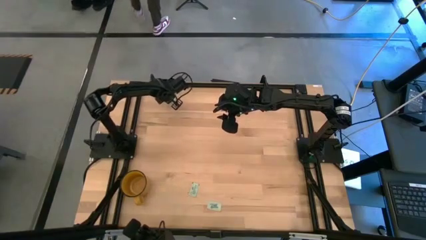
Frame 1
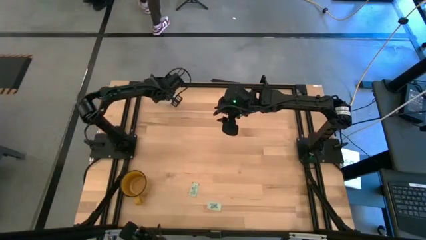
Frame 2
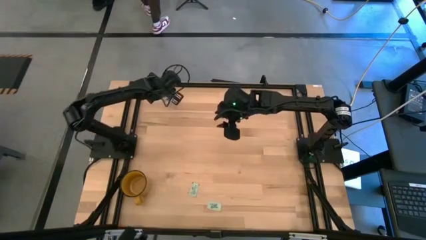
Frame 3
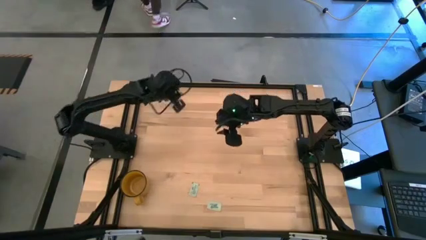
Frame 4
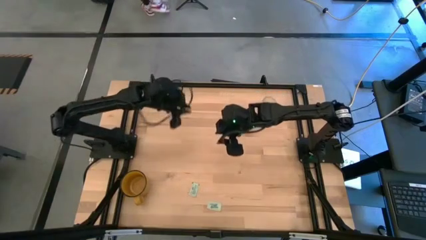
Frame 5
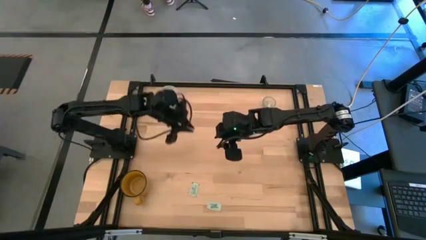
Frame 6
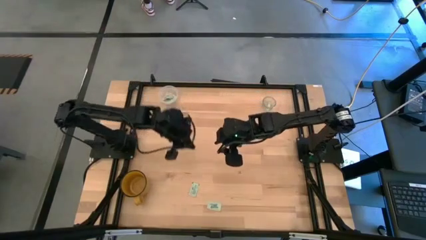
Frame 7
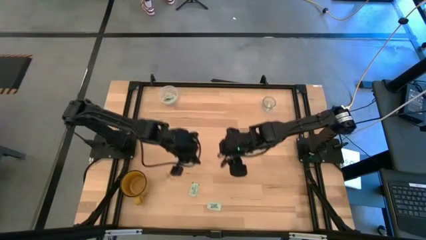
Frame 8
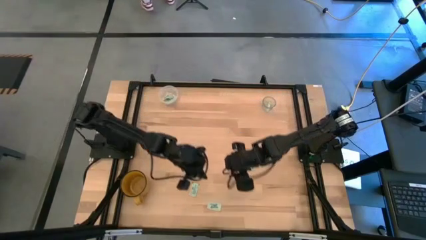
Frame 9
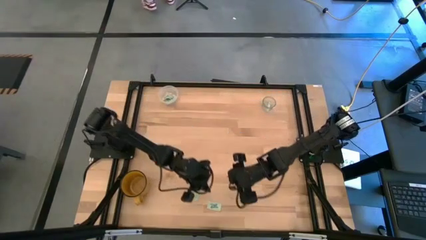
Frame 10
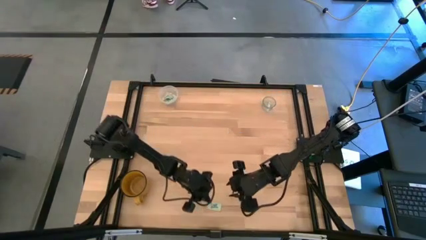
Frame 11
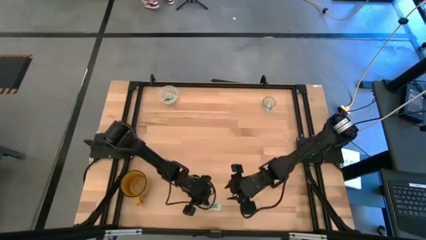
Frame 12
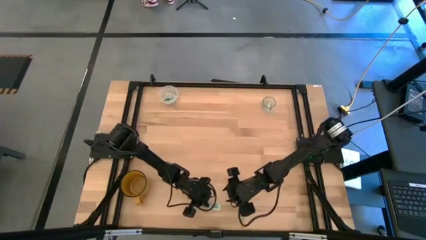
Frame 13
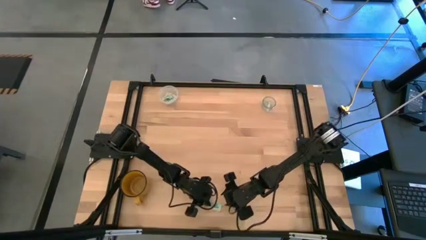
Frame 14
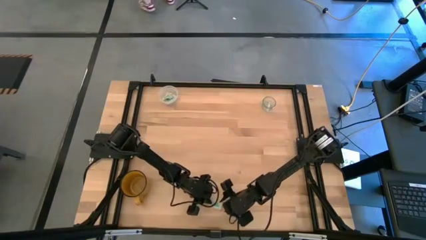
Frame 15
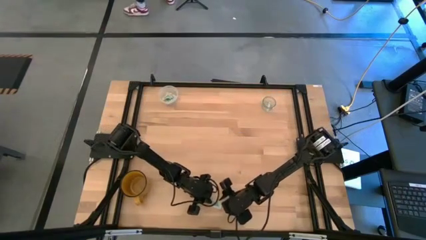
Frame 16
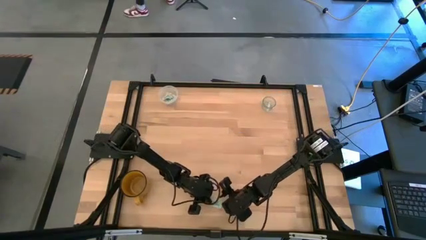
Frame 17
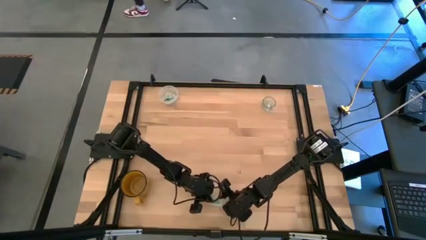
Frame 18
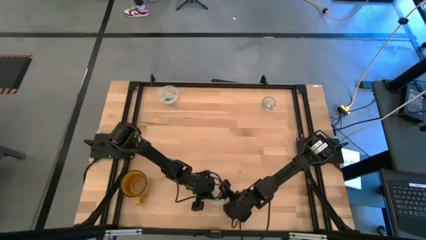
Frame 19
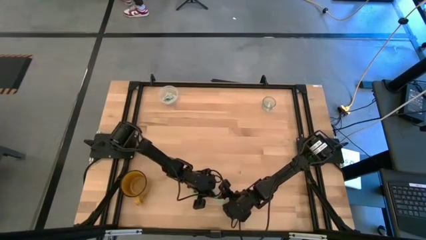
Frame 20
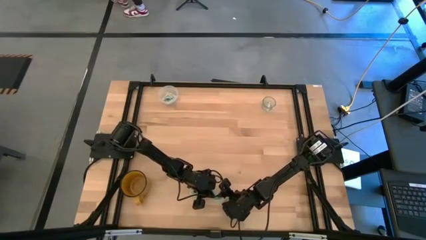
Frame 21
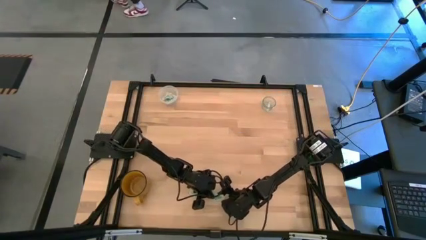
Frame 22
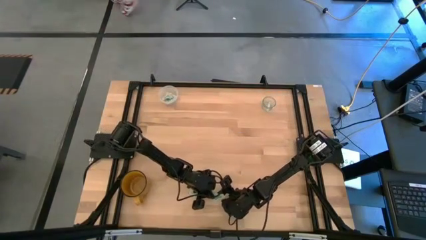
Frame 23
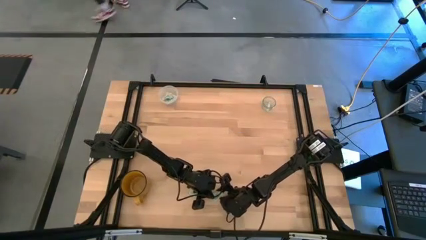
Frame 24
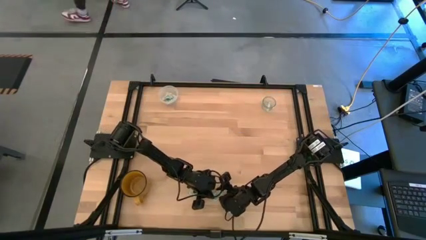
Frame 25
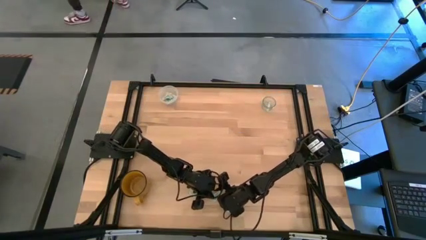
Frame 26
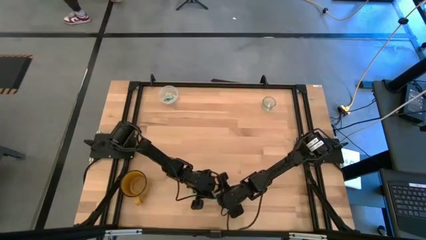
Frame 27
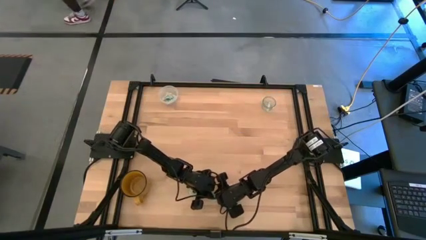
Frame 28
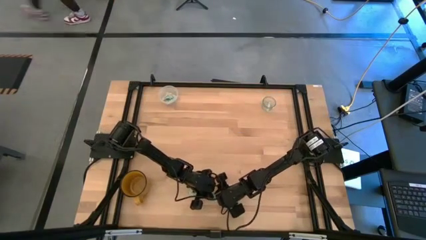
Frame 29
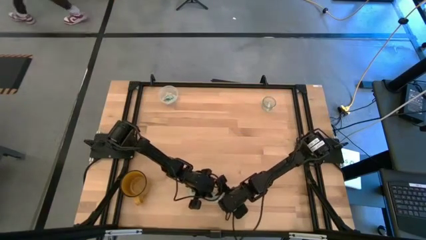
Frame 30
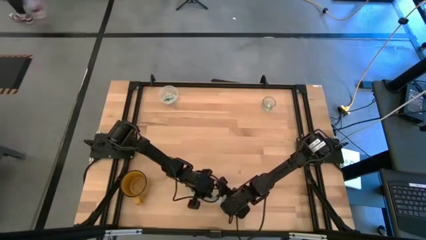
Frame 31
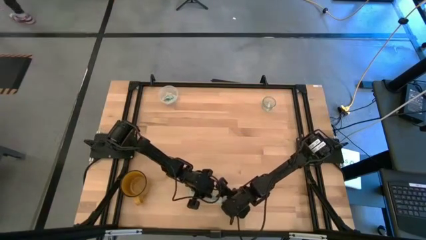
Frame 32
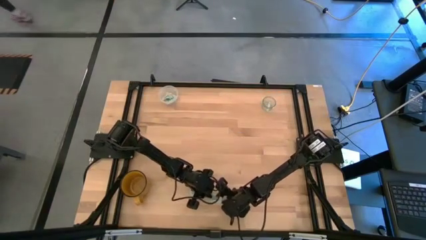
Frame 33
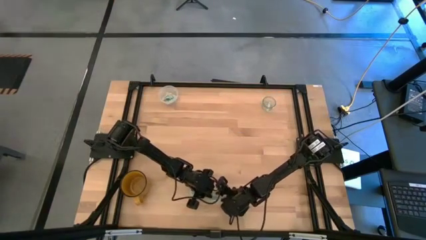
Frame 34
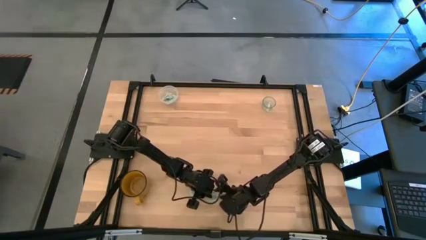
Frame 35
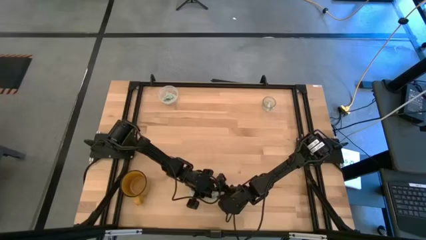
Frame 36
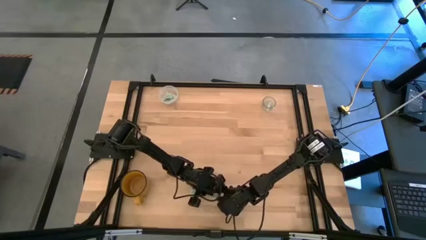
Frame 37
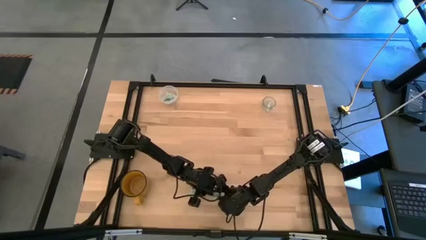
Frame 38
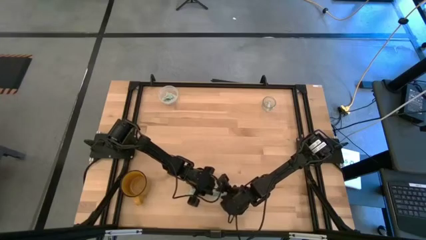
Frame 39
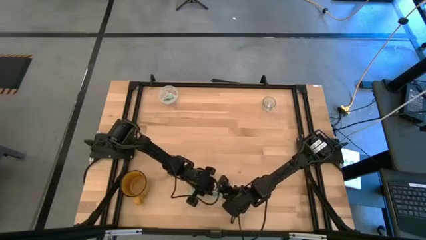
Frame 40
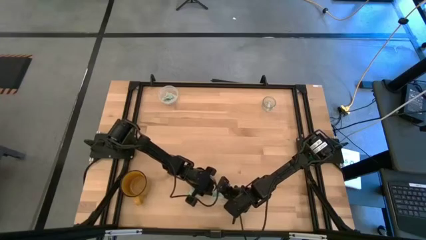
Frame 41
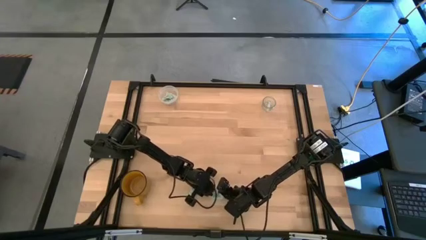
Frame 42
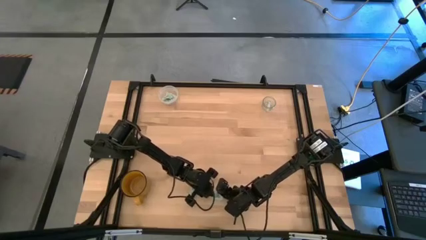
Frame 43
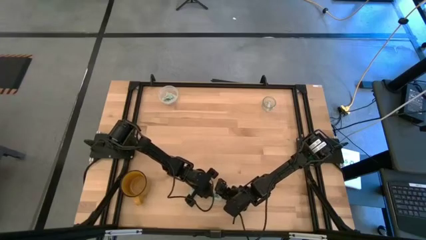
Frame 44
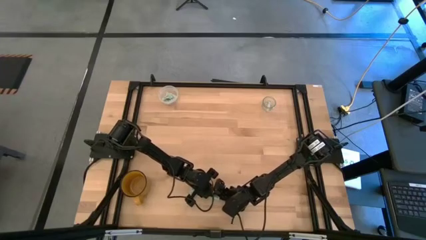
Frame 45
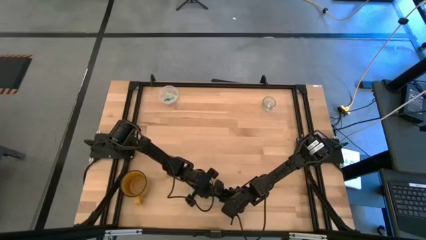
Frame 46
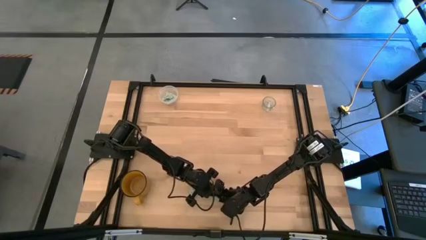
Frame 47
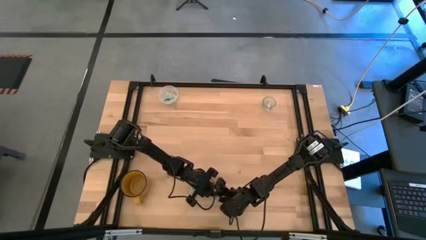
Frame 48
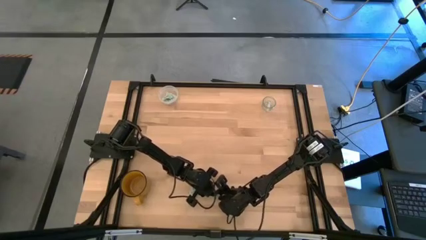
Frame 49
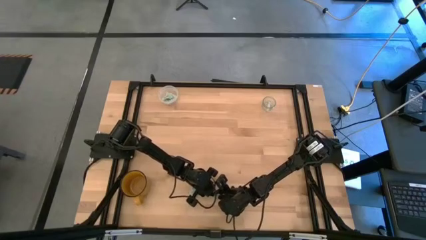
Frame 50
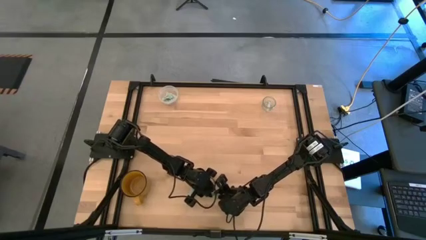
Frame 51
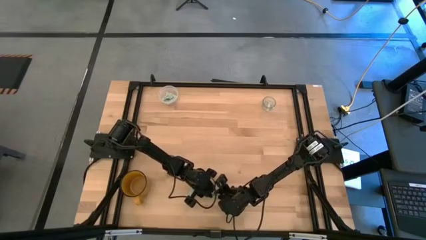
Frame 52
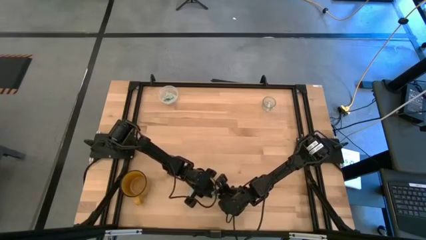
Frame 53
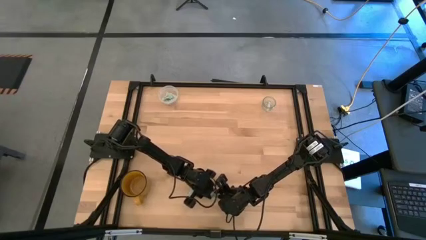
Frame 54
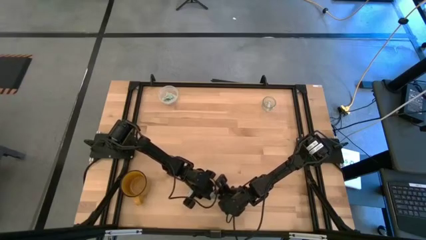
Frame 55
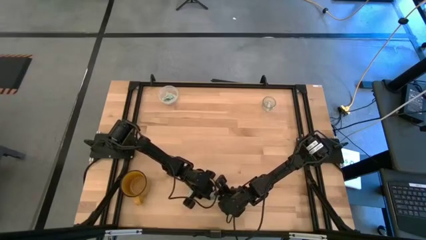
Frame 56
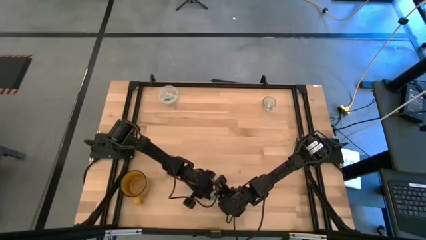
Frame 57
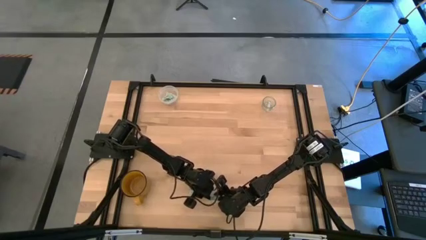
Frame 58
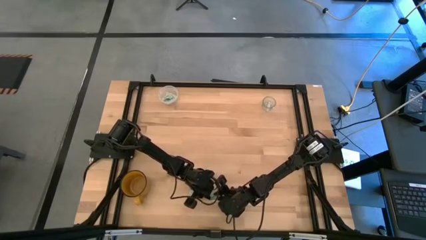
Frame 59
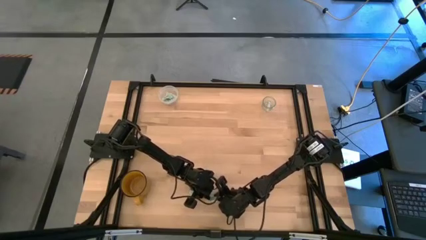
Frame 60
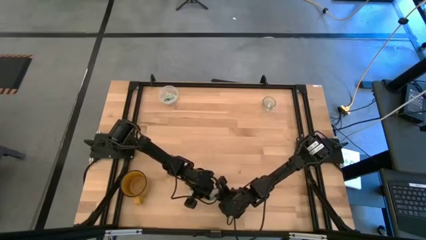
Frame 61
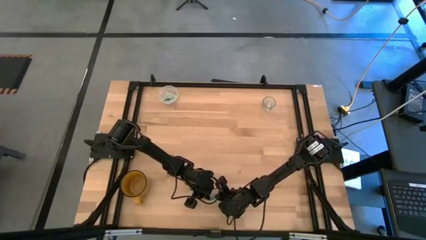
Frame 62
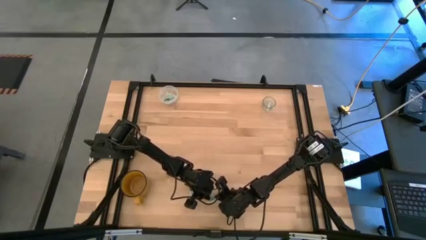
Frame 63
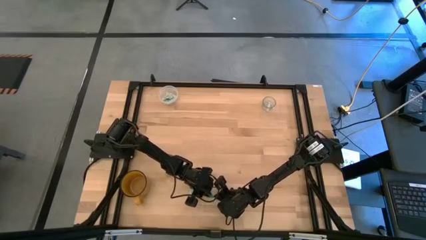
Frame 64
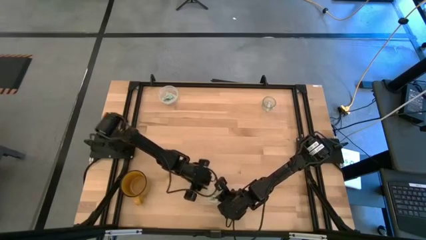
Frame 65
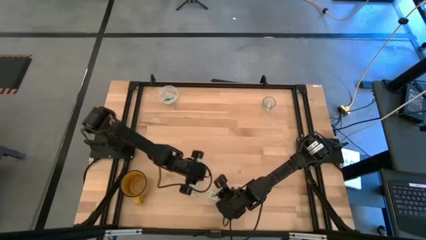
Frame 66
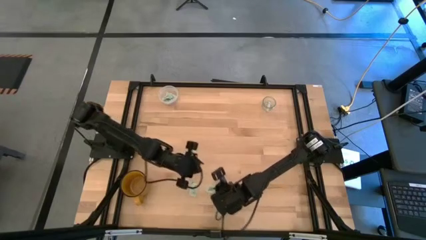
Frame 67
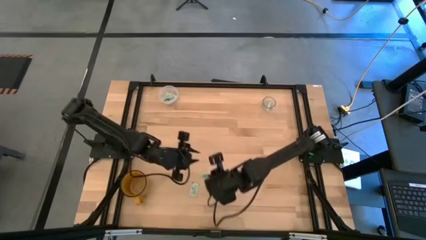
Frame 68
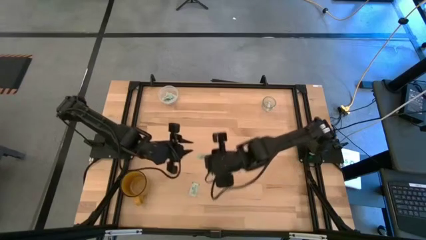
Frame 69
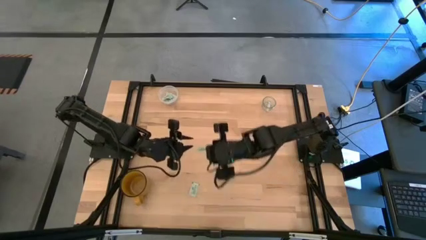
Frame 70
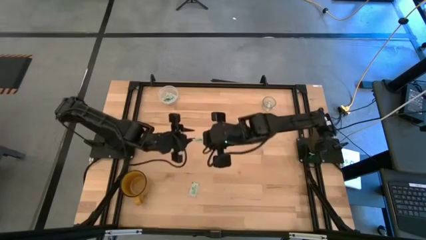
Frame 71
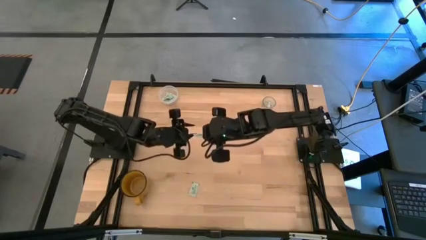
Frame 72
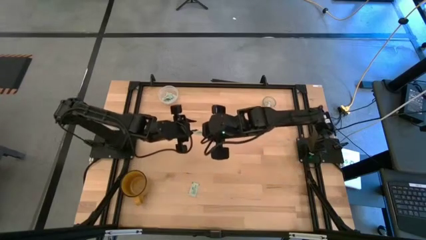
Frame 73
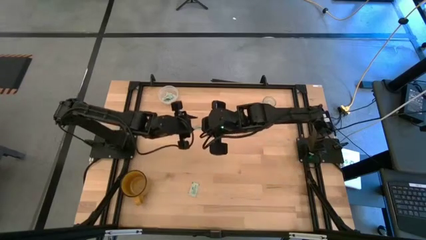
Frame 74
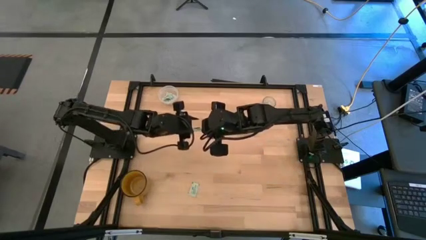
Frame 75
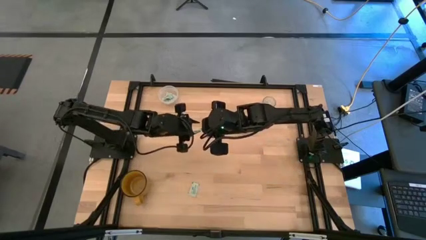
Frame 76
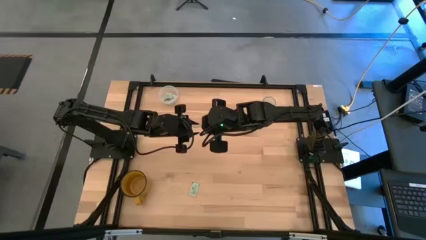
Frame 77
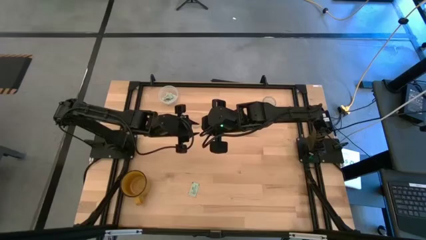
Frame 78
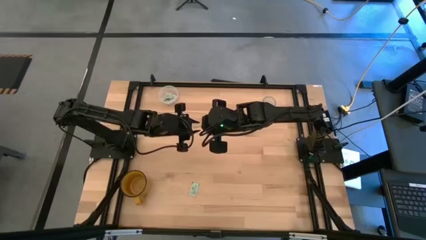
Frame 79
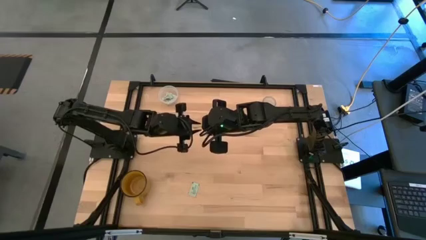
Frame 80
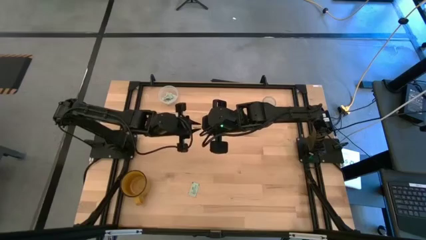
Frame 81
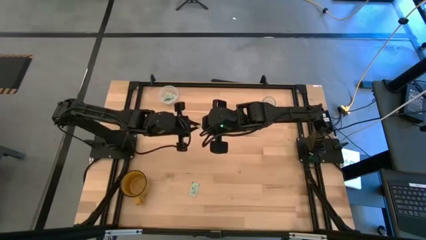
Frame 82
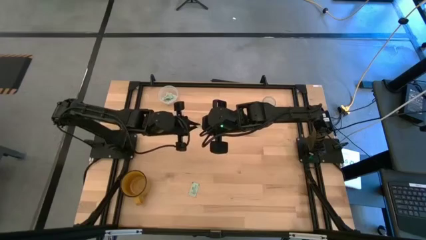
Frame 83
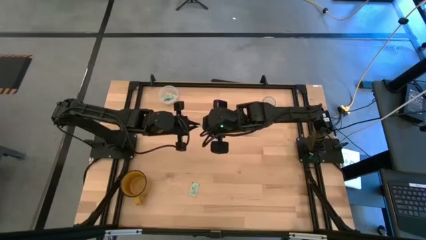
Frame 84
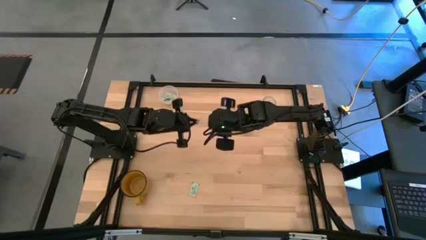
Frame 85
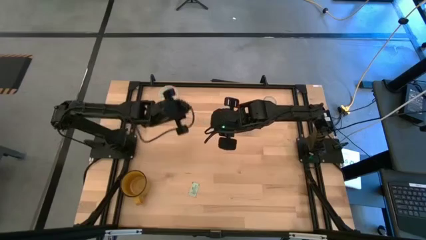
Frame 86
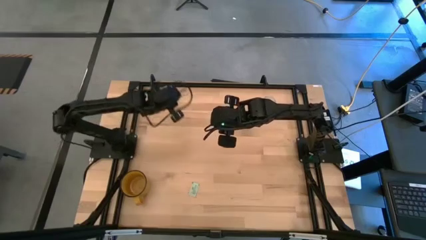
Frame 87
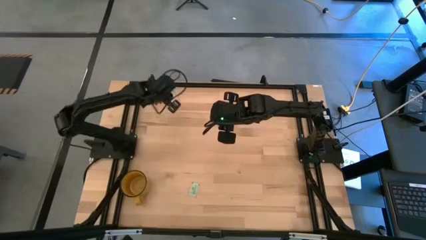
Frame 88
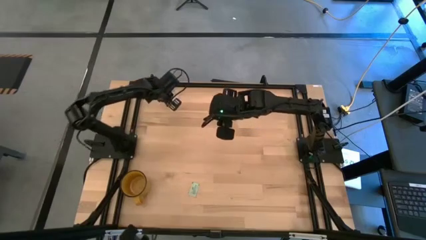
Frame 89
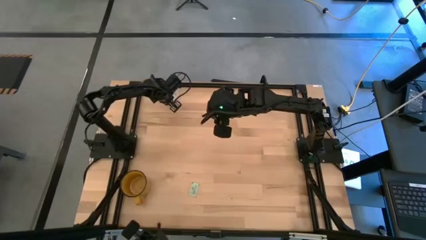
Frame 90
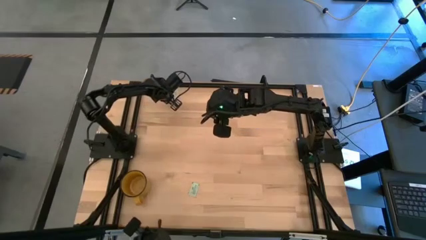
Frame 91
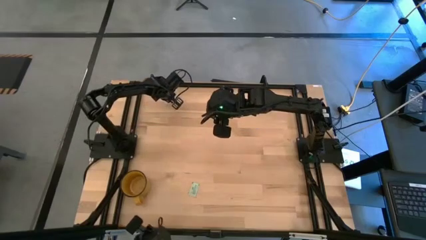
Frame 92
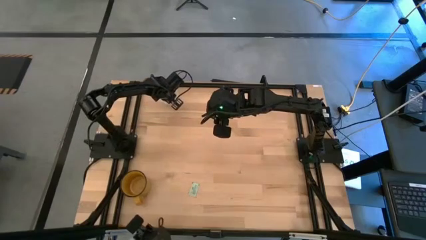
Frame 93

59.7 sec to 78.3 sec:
Task: Pick and place Stevia / Truvia into bins
Put the green stevia packet into the transparent container
